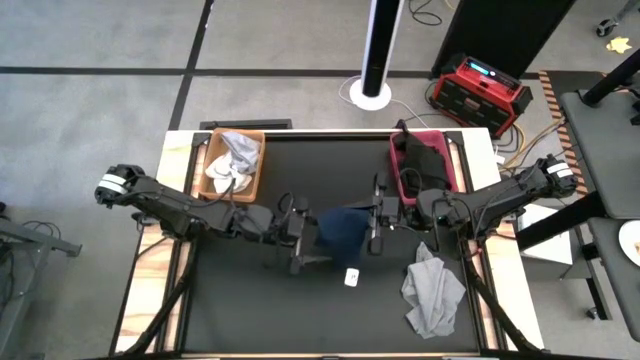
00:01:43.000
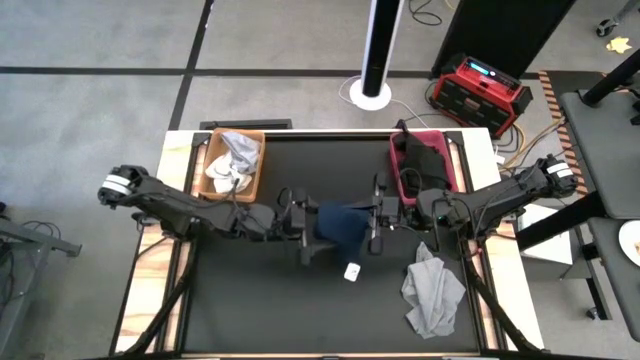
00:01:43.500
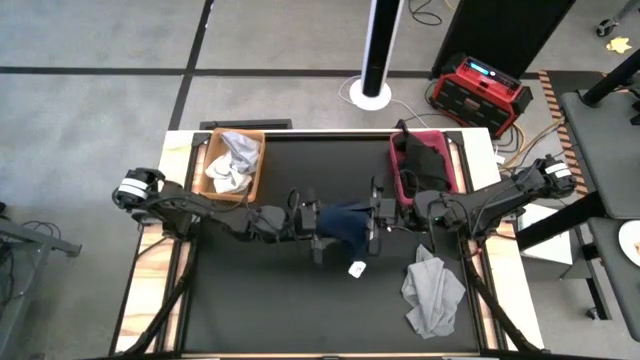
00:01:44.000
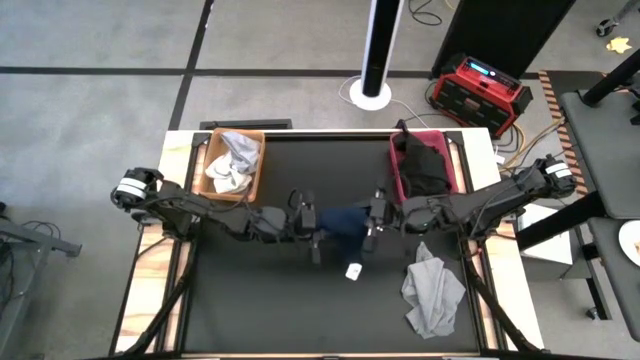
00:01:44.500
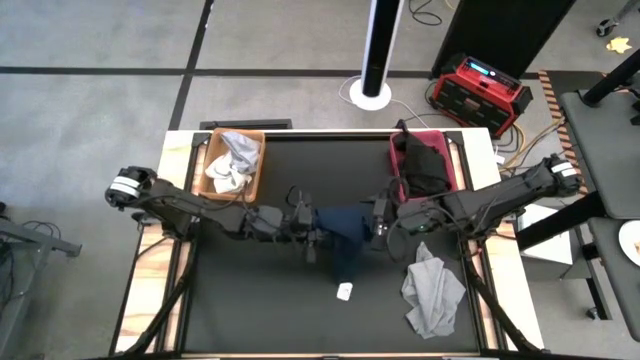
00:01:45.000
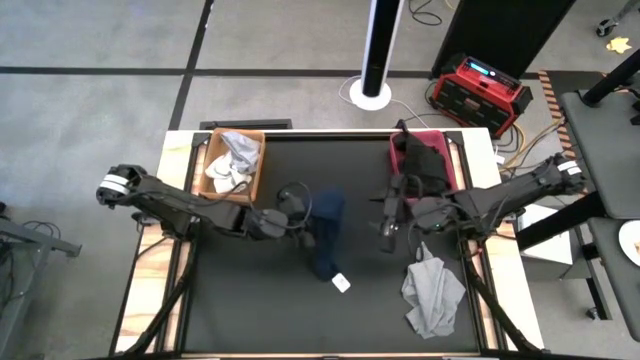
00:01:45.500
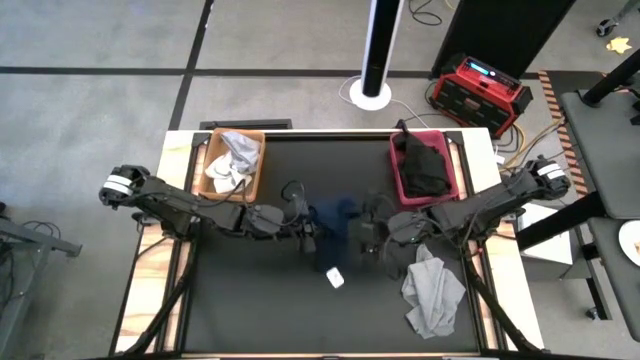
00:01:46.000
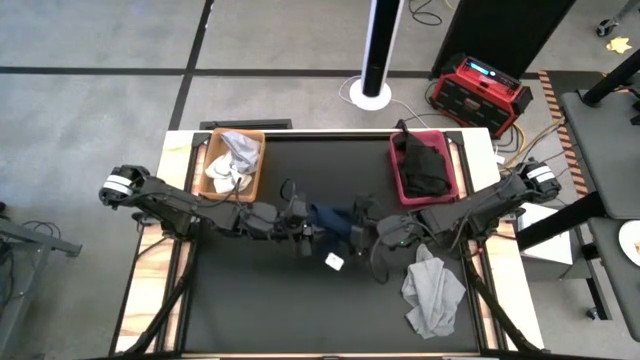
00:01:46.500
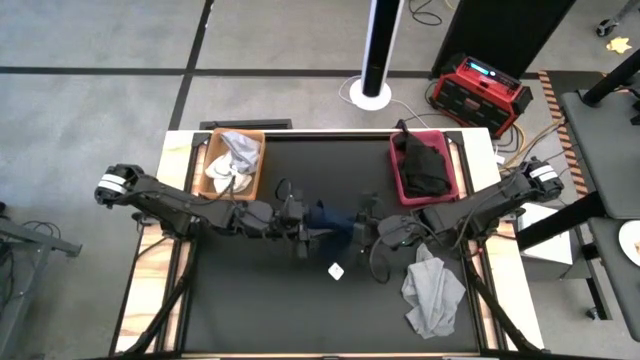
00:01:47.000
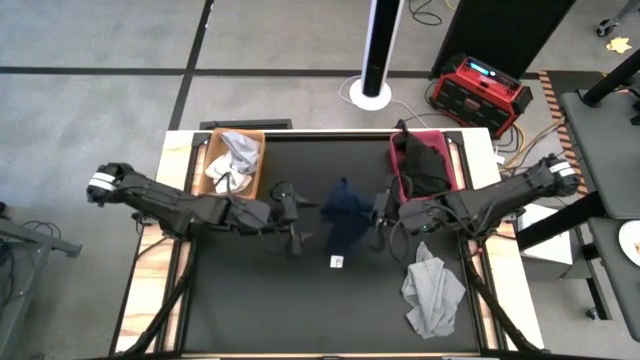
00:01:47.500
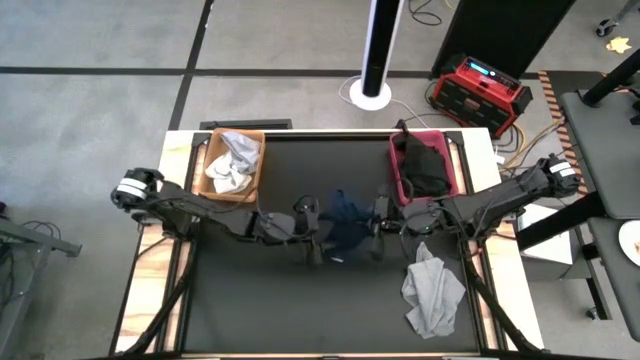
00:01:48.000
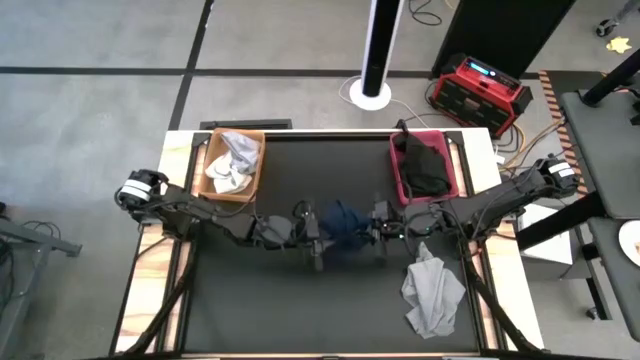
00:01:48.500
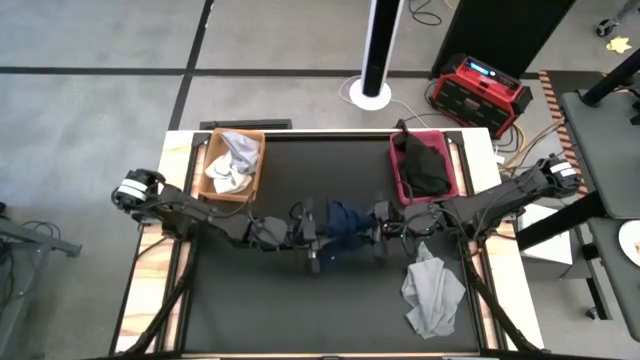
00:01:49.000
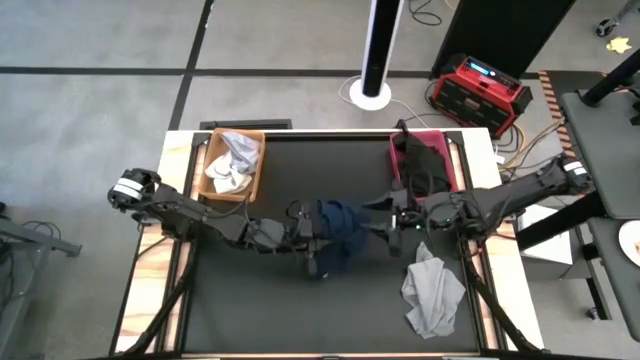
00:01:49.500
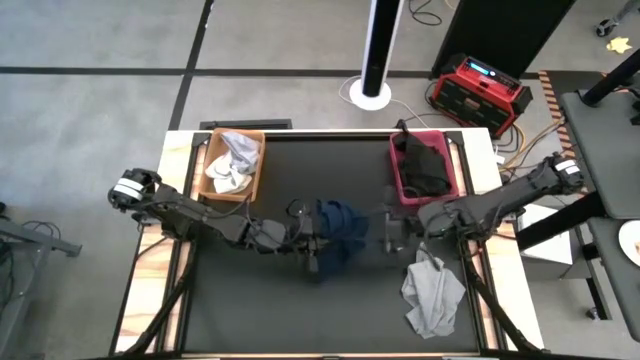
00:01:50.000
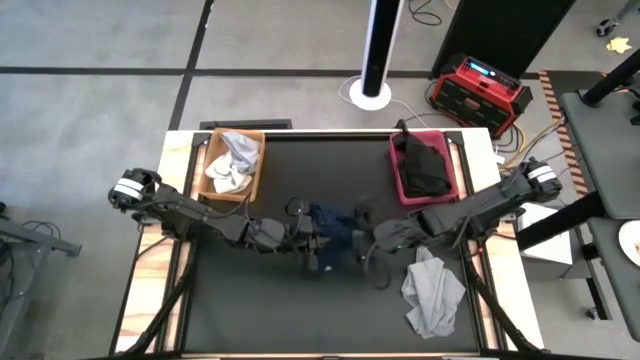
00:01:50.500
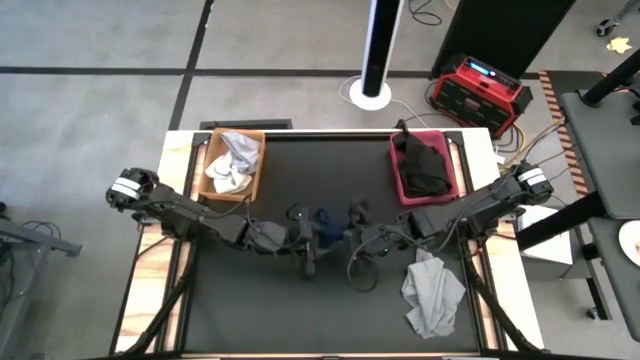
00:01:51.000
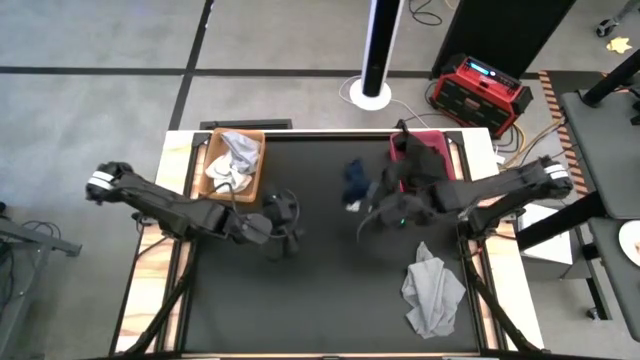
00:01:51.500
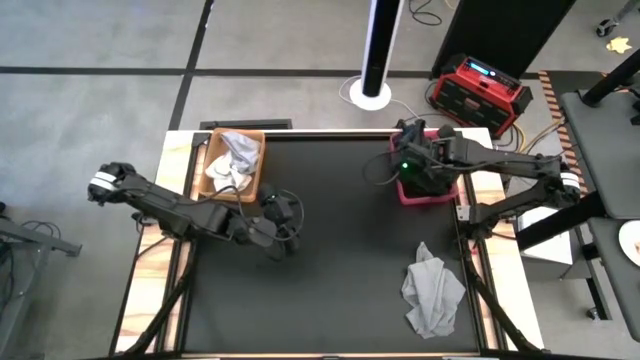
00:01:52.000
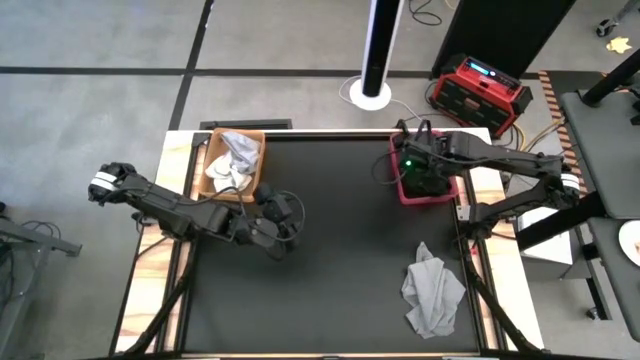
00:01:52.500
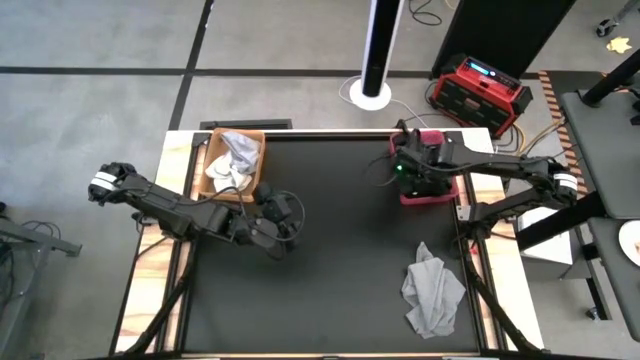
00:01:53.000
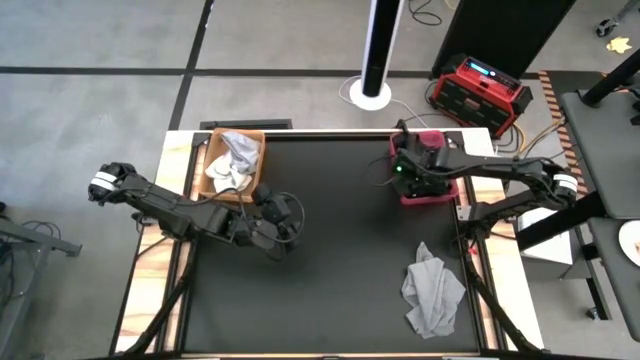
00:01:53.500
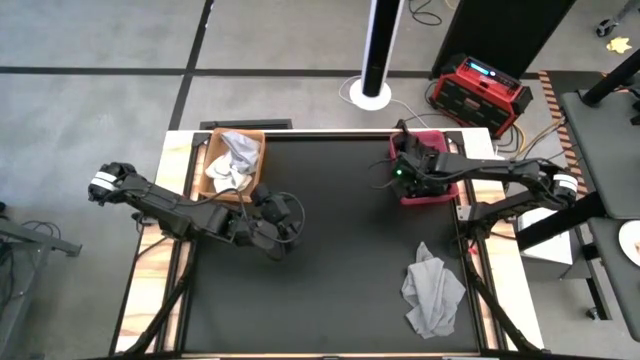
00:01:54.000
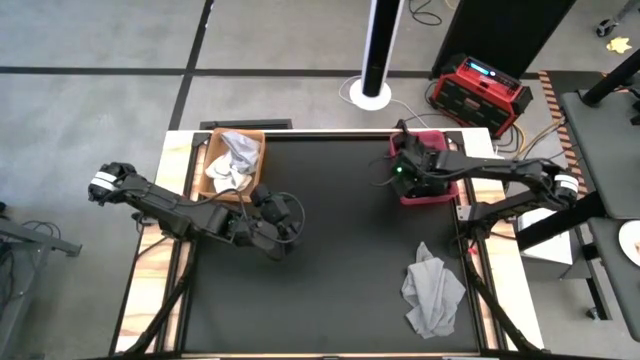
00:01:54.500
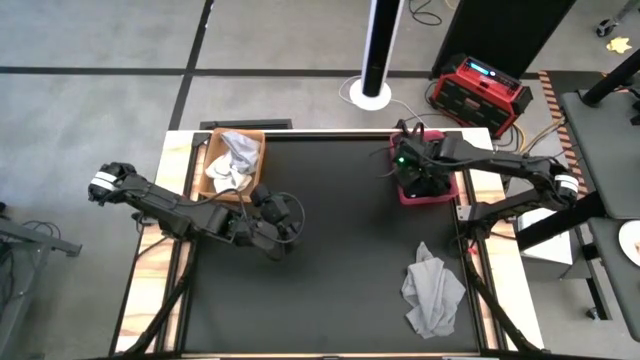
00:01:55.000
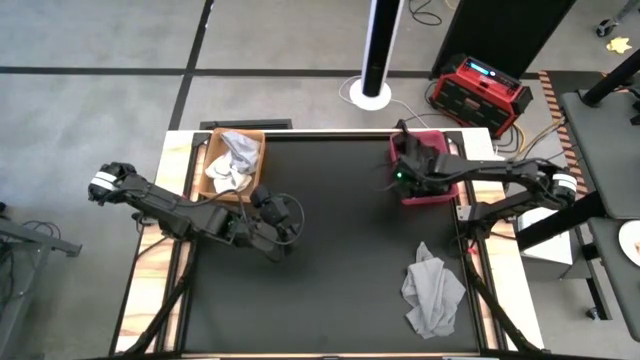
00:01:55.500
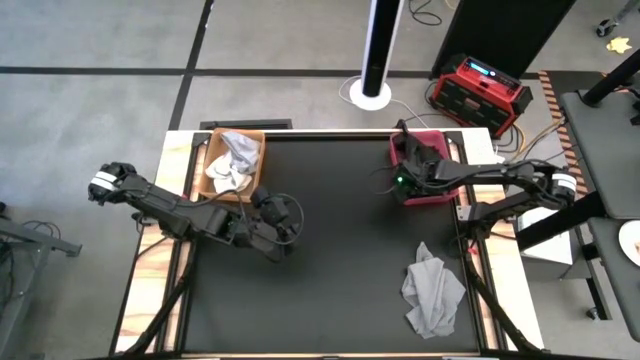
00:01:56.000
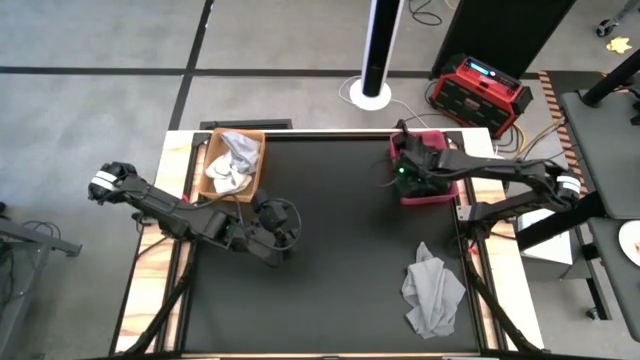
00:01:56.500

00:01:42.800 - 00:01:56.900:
Task: Sort towels by color in basket
Put the blue towel into the red bin

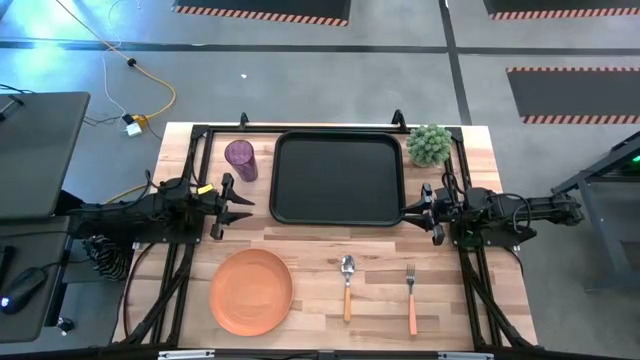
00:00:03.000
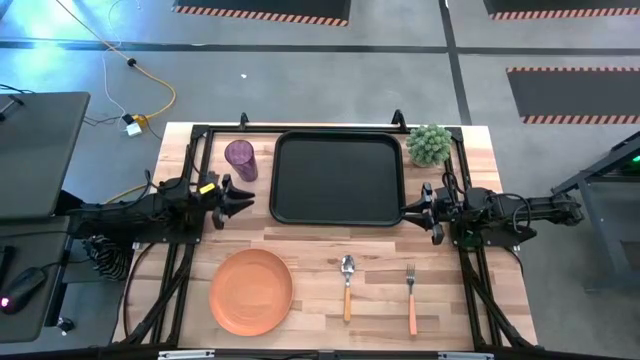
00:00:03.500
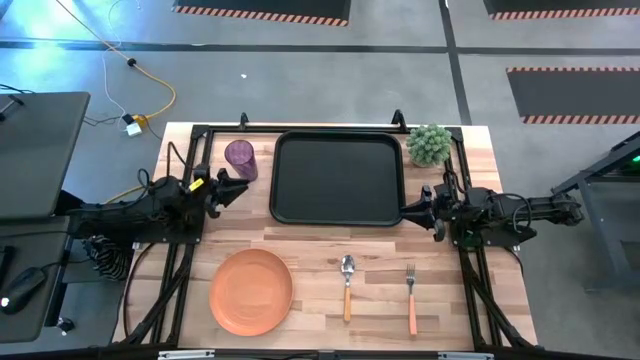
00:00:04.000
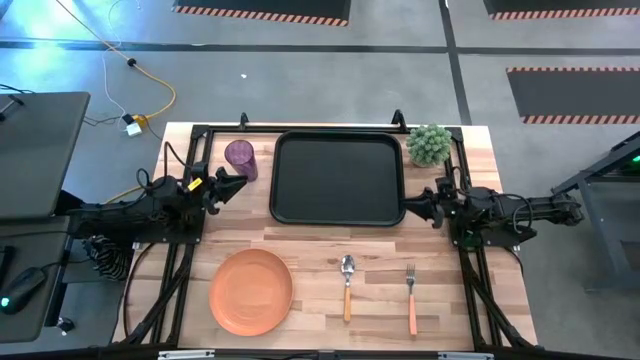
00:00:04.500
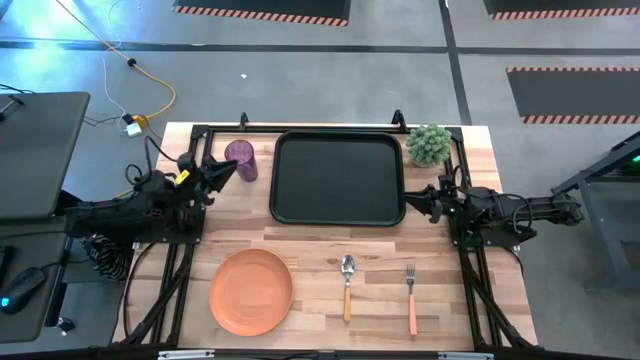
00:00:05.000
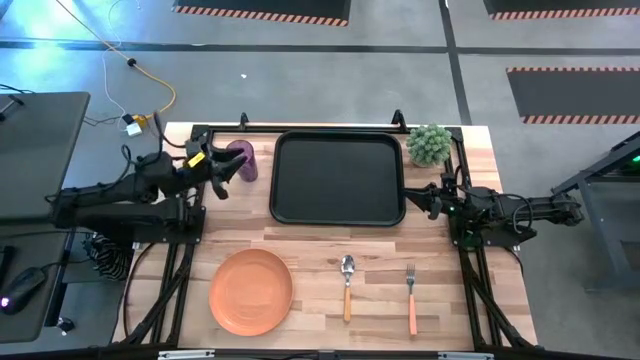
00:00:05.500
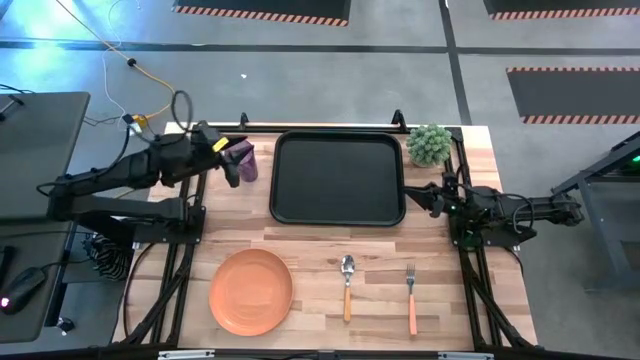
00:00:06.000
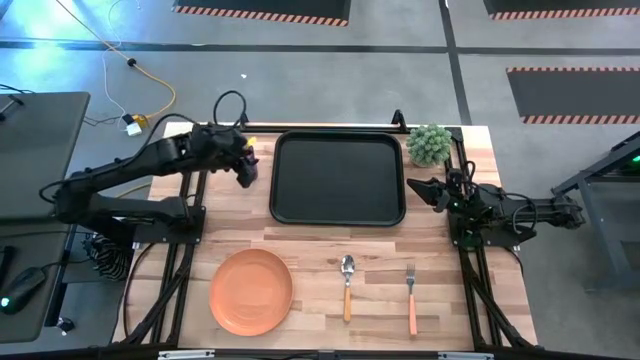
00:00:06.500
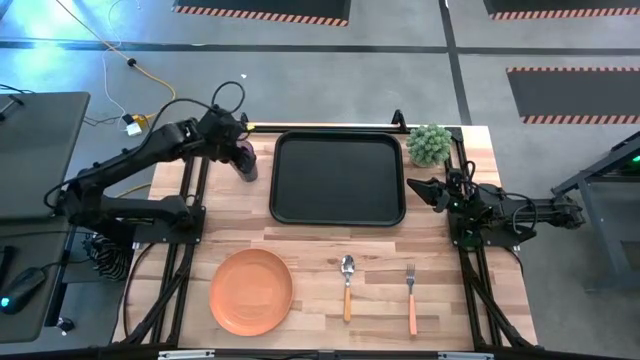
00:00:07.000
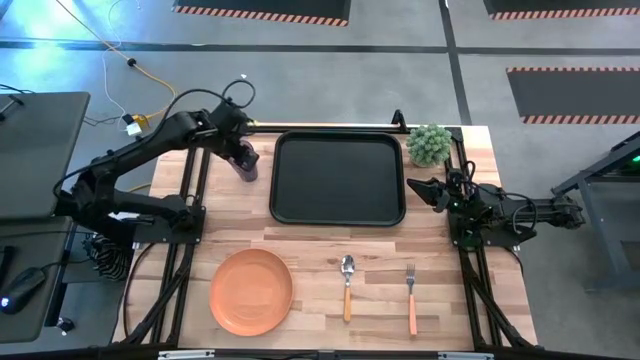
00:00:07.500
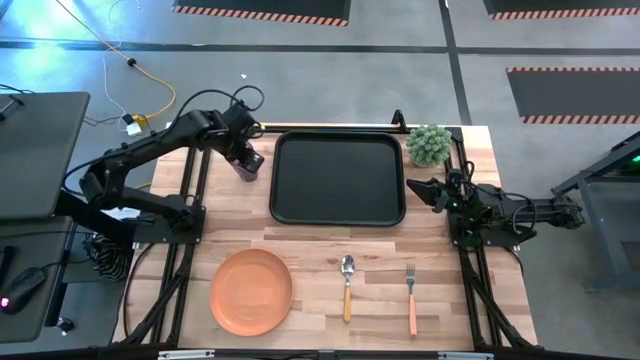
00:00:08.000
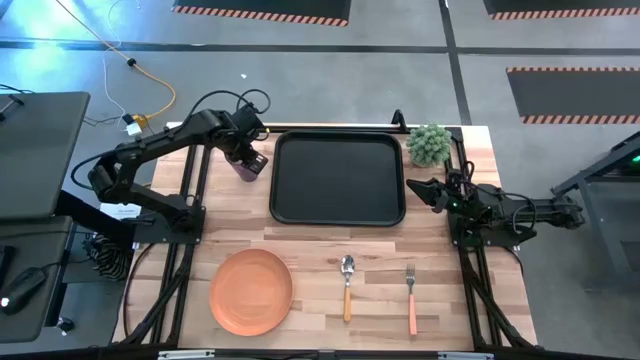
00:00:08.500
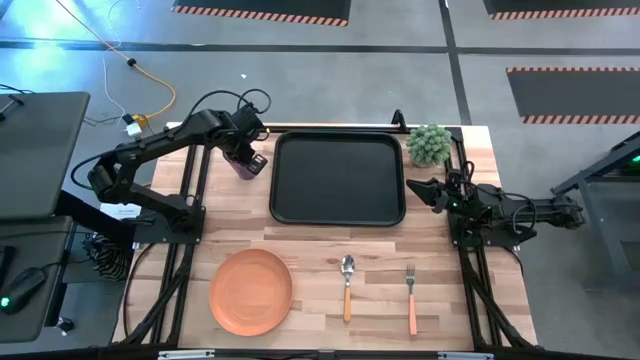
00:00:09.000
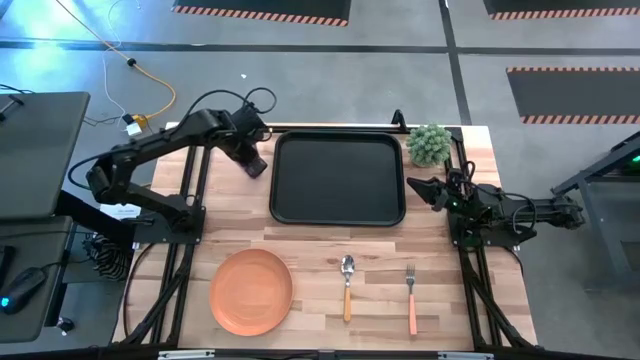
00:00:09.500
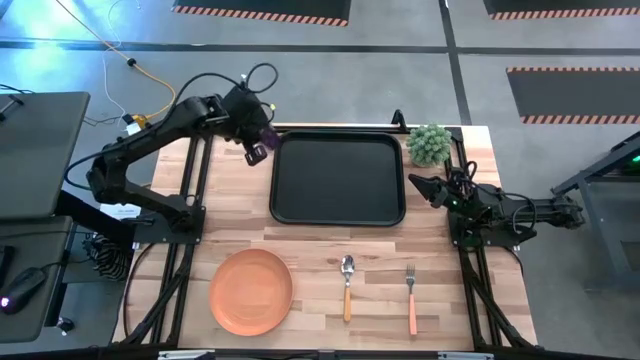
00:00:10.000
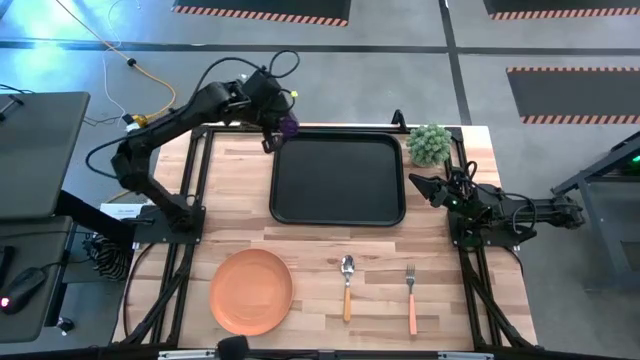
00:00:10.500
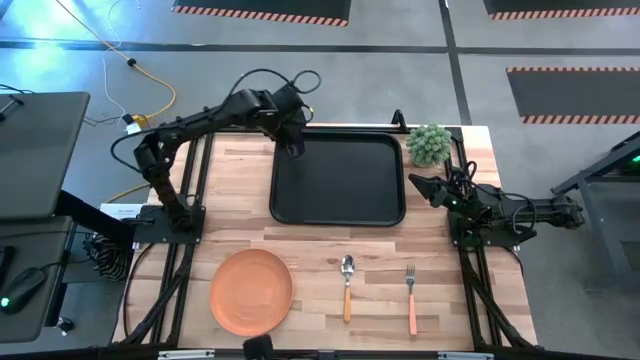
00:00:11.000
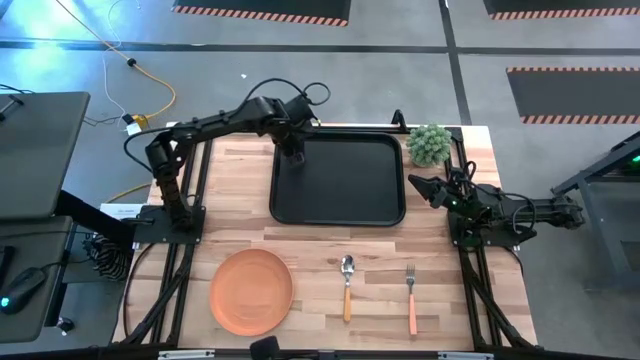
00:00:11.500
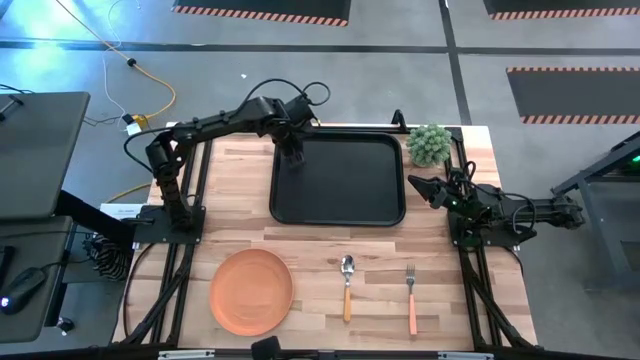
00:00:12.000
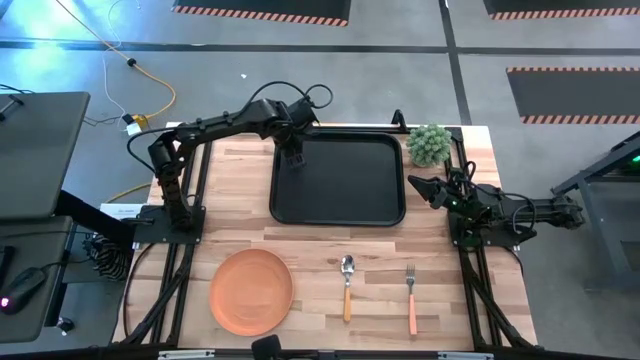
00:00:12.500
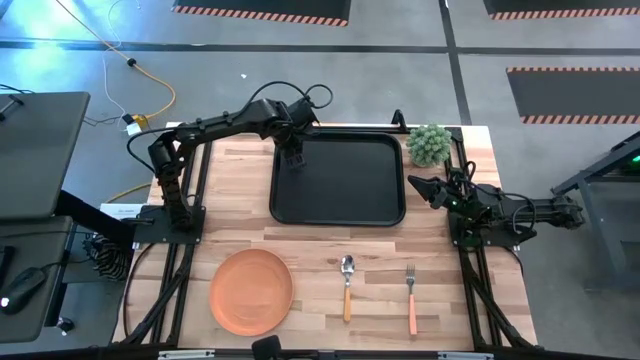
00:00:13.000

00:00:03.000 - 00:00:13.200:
Task: Pick and place plate/cup/fork/spoon on tray
Put the violet cup on the black tray
